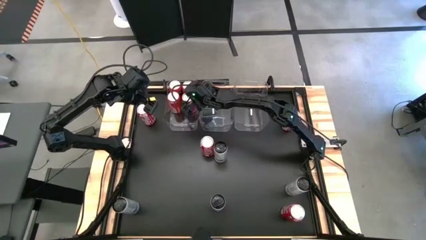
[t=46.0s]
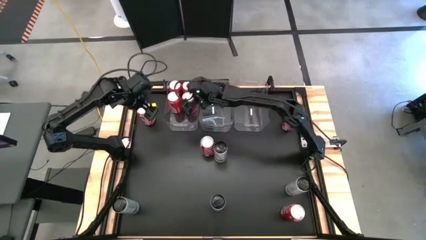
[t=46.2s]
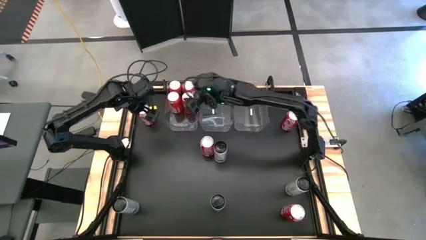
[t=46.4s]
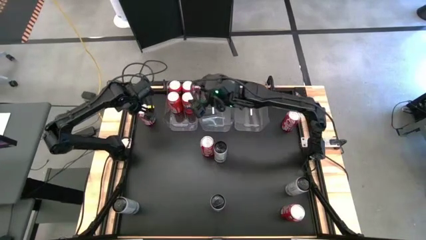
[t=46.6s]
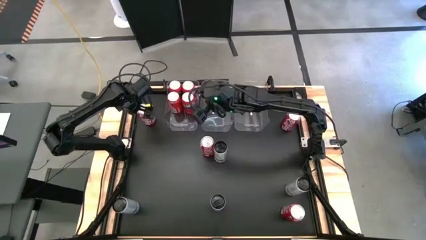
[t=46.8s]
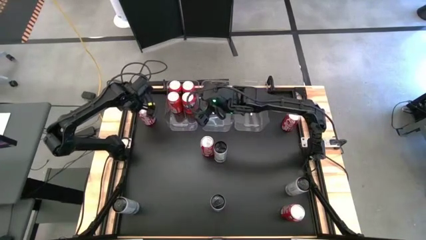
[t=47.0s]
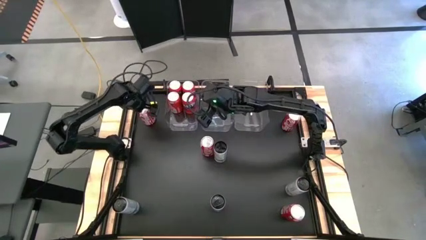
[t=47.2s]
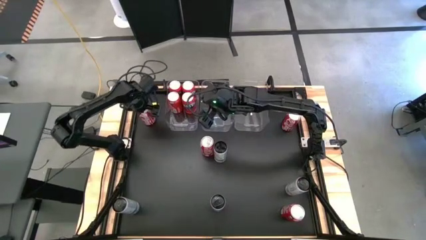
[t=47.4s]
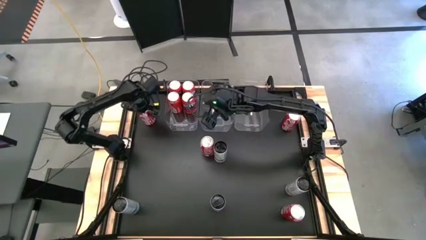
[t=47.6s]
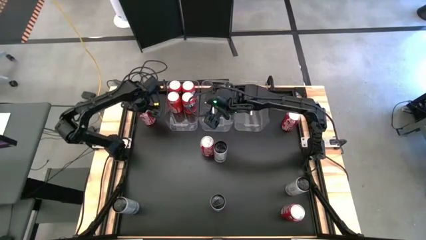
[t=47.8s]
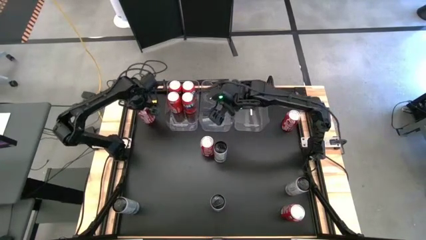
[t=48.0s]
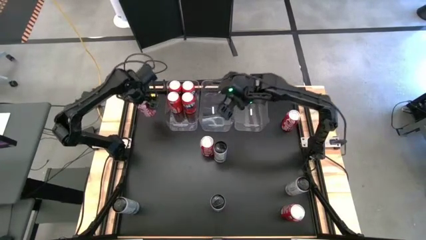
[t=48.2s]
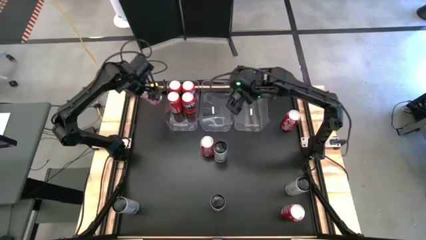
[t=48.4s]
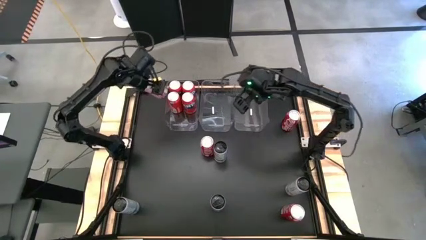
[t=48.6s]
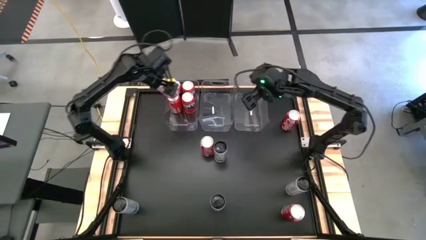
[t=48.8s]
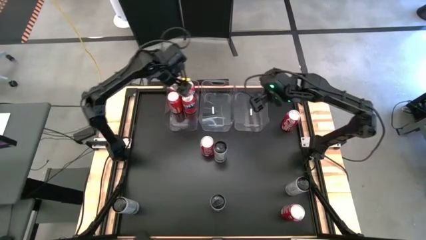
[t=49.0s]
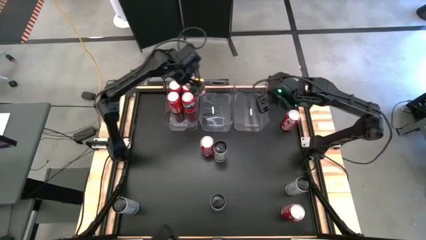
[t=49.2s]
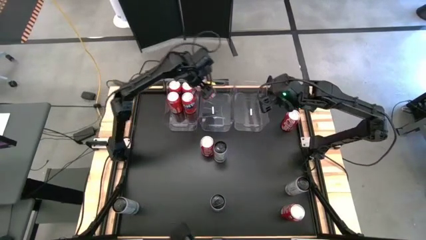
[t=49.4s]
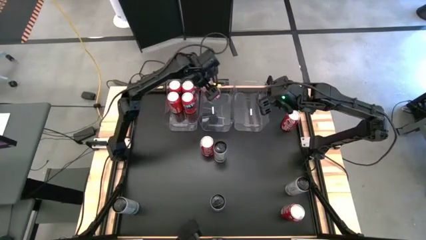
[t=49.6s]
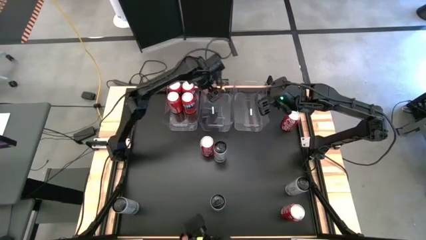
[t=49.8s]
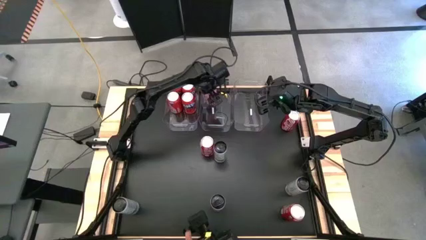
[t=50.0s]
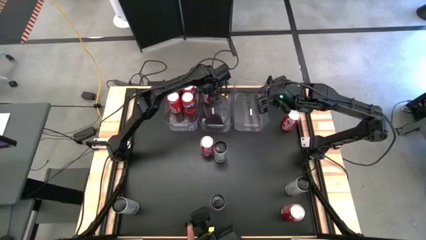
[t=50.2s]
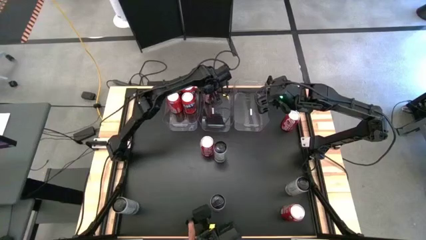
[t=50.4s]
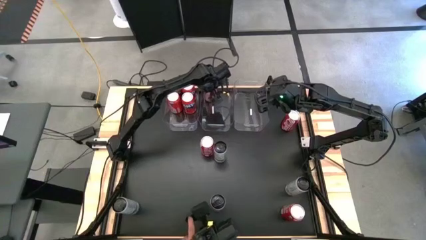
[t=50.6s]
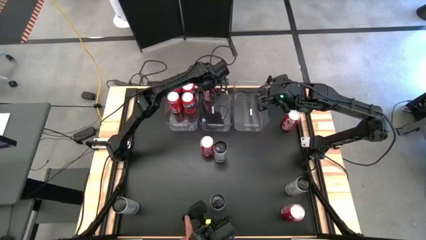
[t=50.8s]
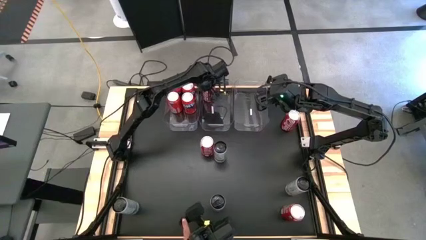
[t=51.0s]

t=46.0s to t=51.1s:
Task: Sort soda cans
Put the top left red and white soda can into the middle transparent bin

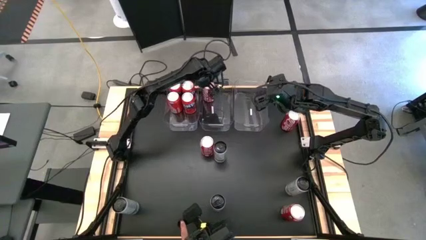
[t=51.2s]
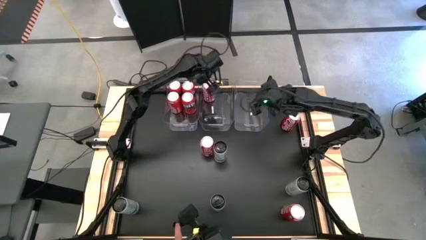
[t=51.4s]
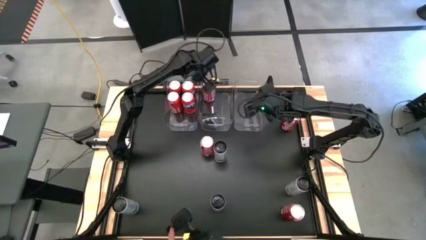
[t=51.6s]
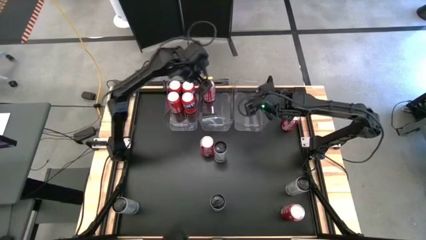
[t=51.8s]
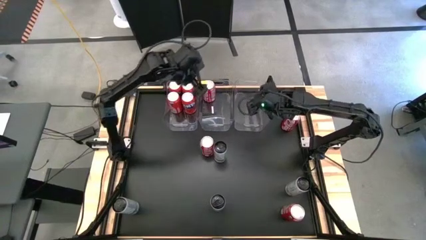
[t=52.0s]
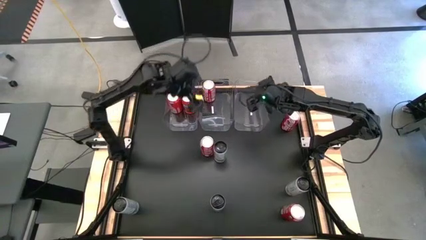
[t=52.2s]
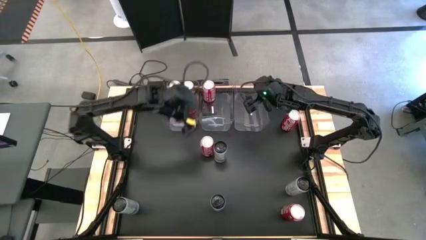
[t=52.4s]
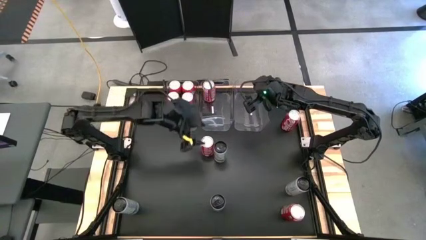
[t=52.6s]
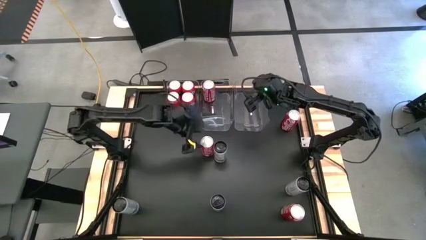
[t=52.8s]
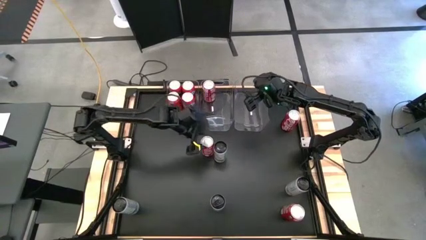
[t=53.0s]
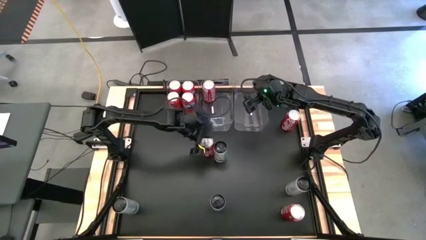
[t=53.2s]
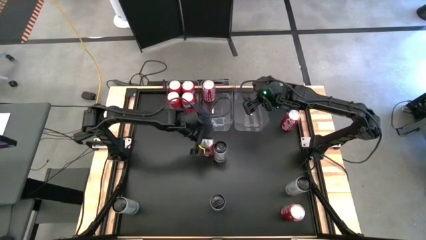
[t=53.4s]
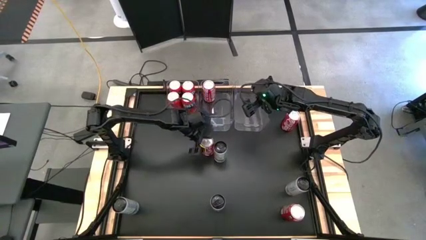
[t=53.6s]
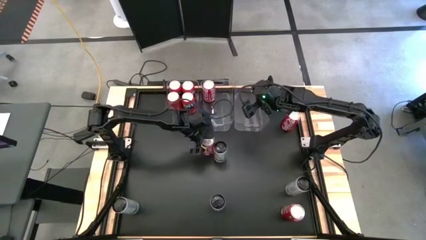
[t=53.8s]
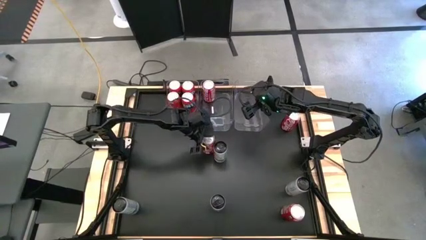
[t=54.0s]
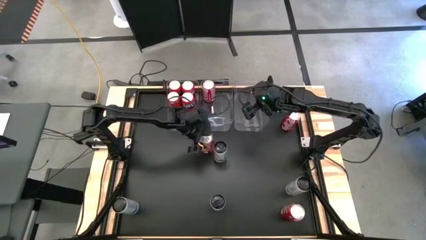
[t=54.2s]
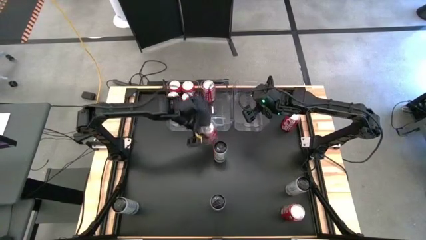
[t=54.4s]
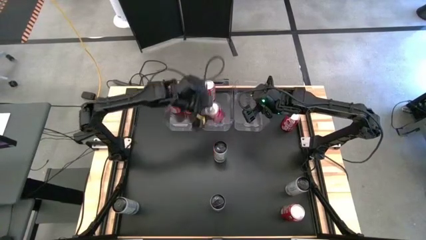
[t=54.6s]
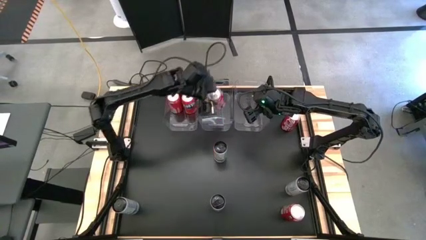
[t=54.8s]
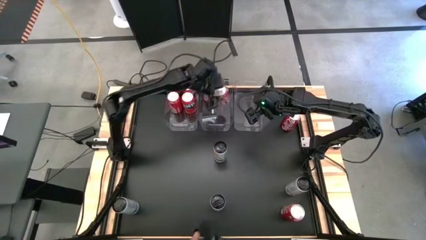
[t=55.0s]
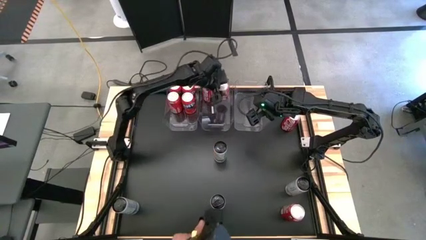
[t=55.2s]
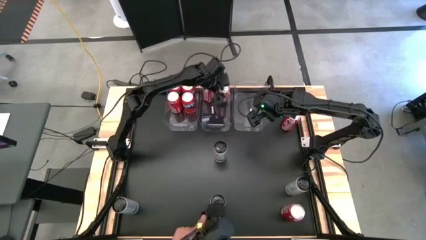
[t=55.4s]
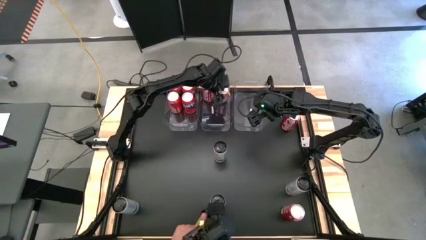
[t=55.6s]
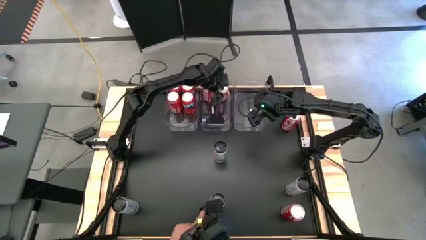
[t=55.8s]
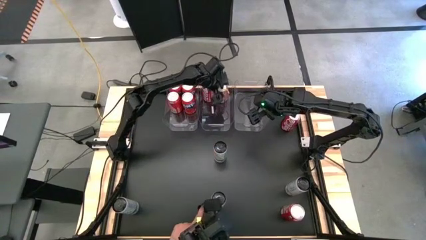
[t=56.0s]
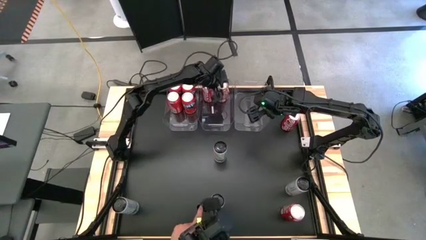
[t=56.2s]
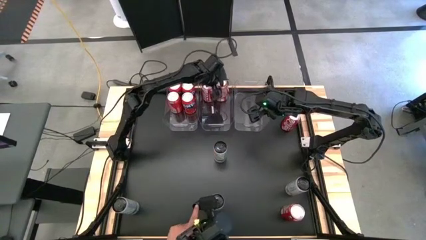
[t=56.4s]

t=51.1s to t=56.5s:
Put the middle left red and white soda can into the middle transparent bin

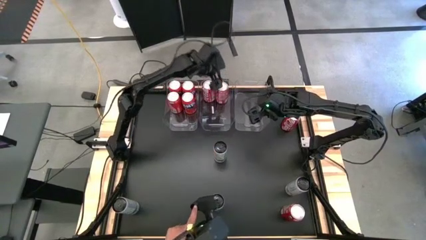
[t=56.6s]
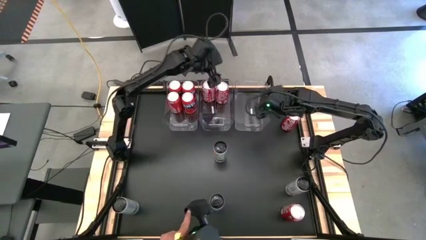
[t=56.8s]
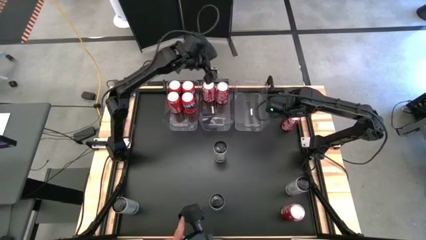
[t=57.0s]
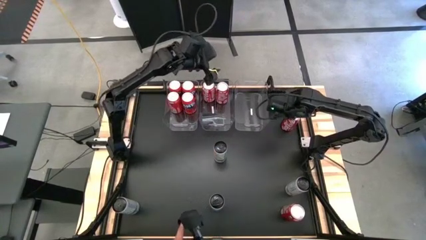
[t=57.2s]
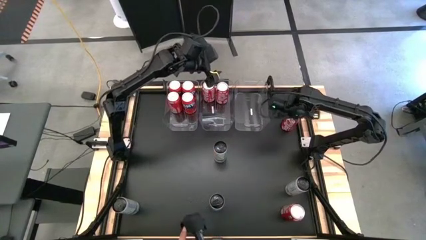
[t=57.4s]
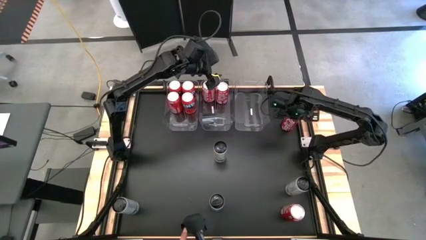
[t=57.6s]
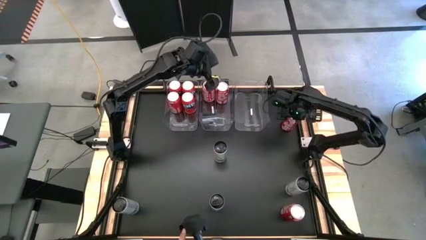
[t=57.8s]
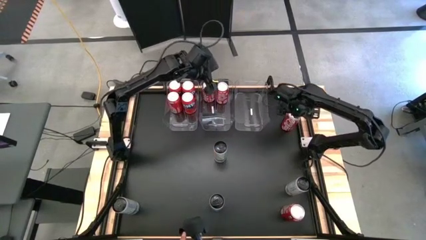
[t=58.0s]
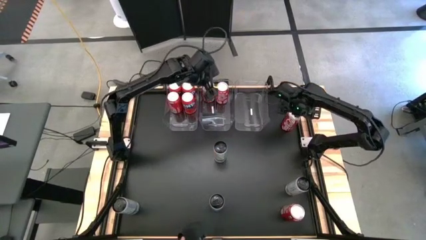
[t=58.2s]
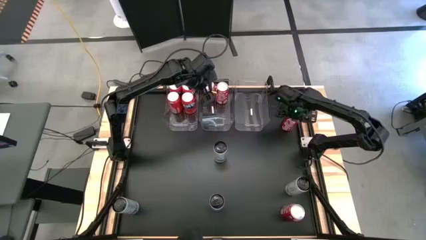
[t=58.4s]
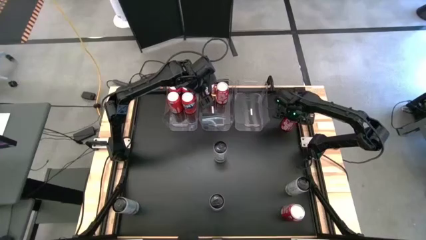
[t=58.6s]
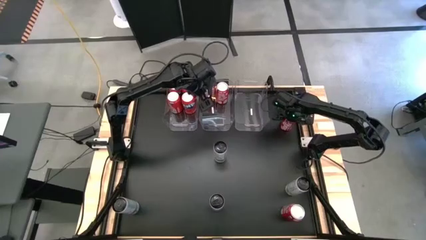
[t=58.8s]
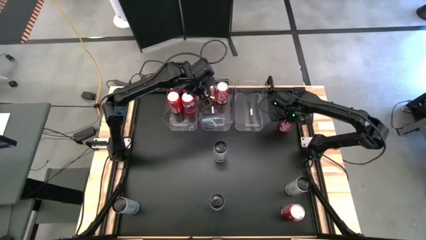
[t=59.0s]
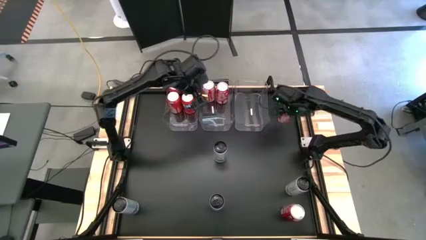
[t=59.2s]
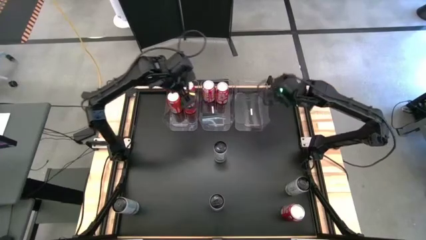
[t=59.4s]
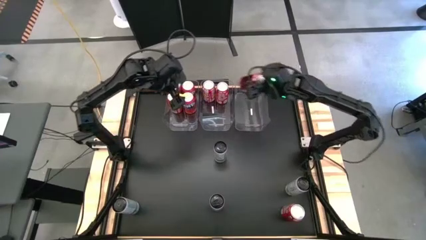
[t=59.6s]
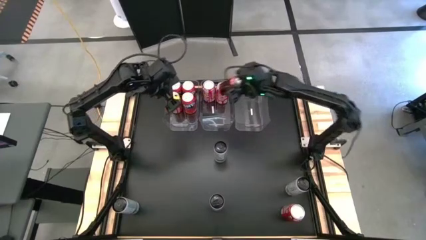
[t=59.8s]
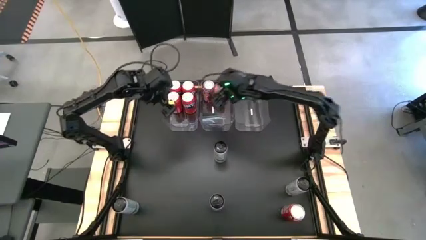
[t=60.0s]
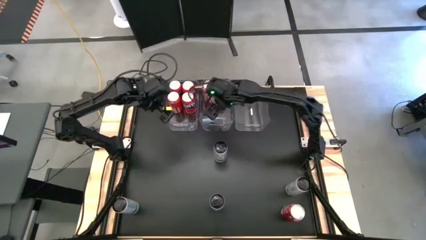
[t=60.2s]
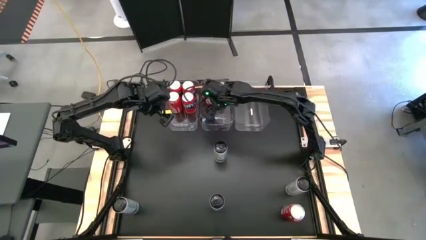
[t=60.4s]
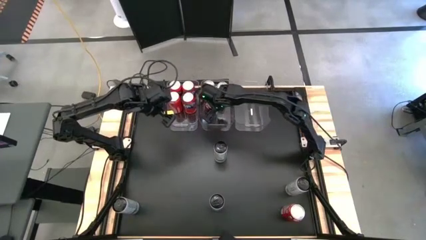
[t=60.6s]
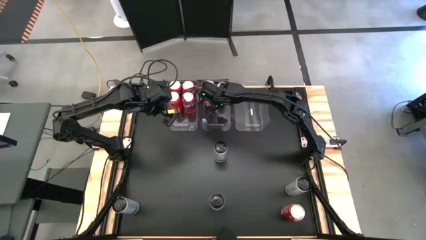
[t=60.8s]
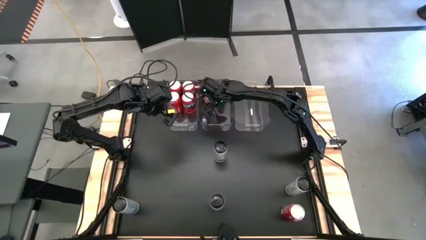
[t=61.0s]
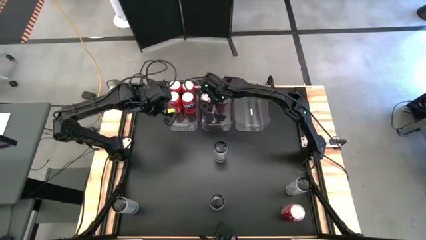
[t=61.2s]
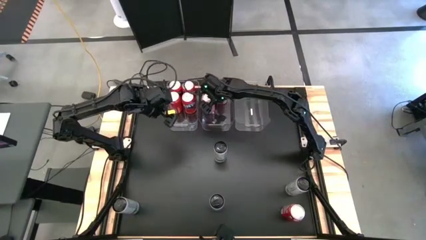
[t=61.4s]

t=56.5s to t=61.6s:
Put the top red and white soda can into the middle transparent bin
